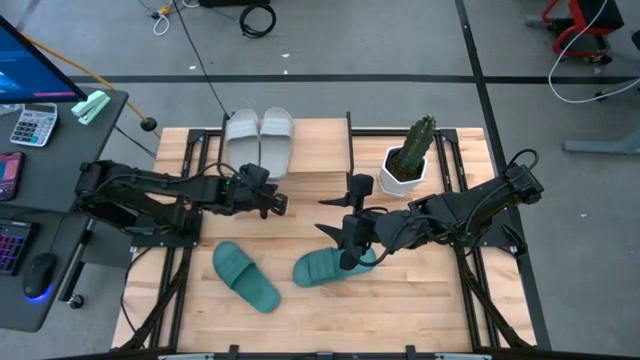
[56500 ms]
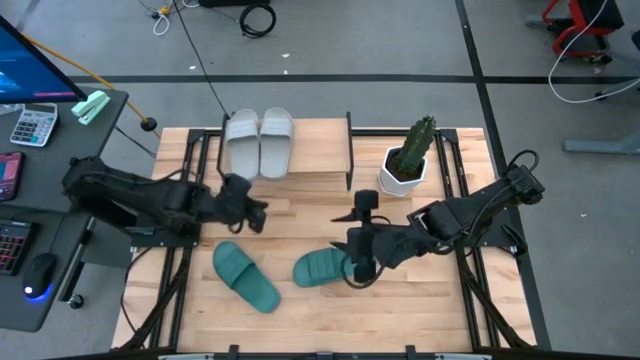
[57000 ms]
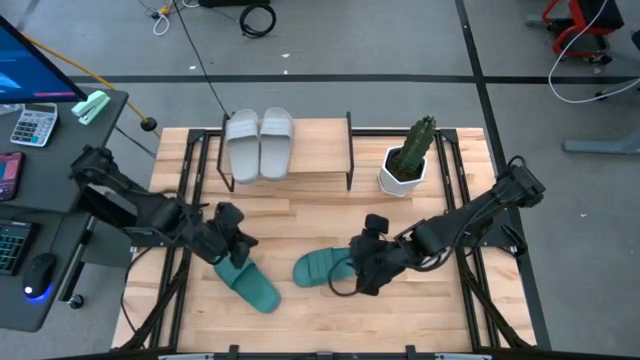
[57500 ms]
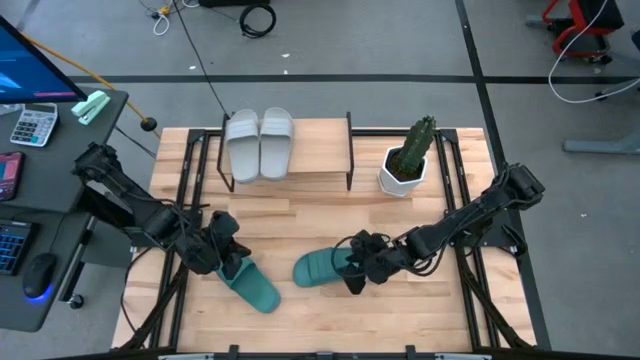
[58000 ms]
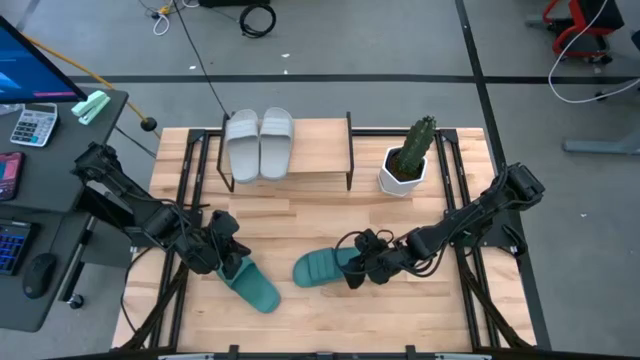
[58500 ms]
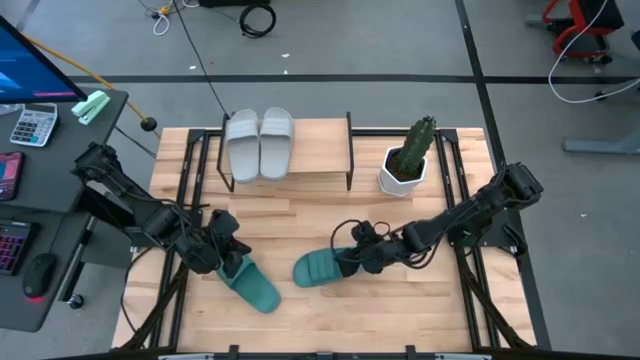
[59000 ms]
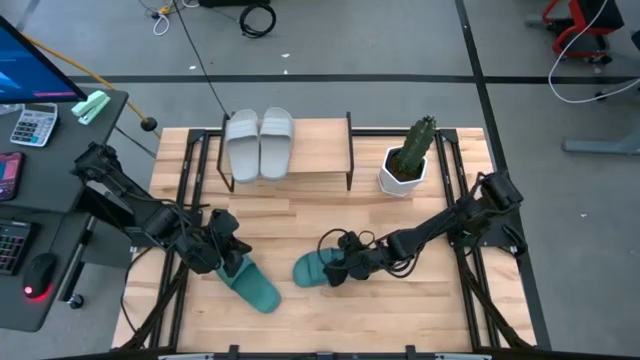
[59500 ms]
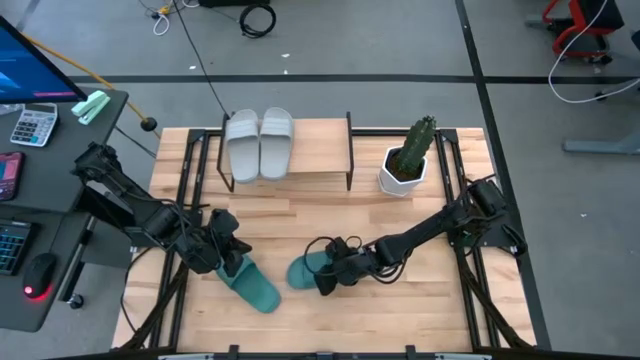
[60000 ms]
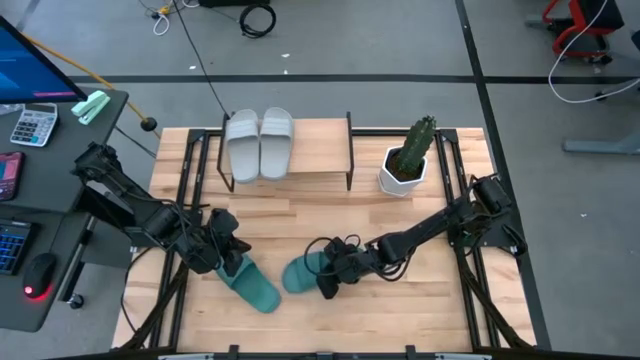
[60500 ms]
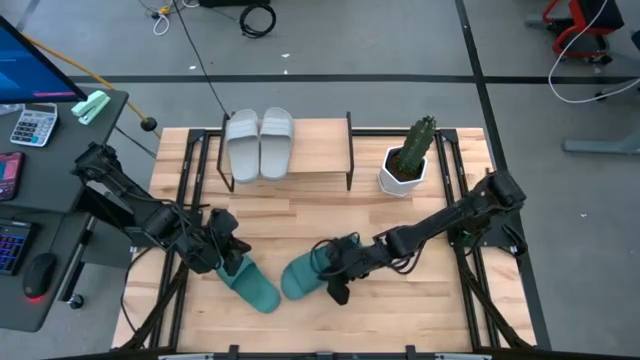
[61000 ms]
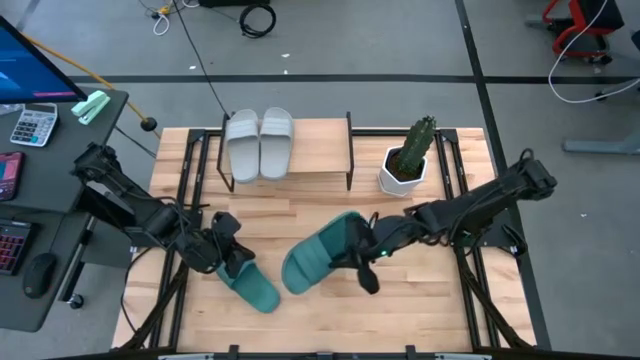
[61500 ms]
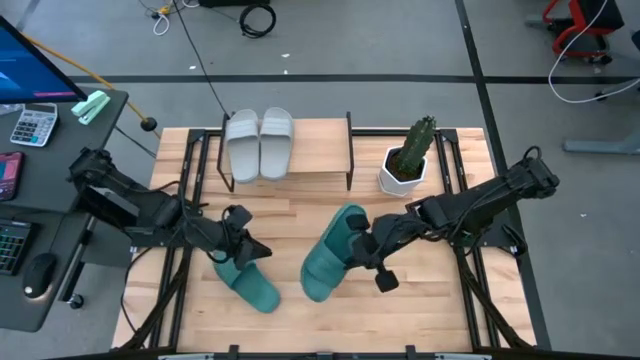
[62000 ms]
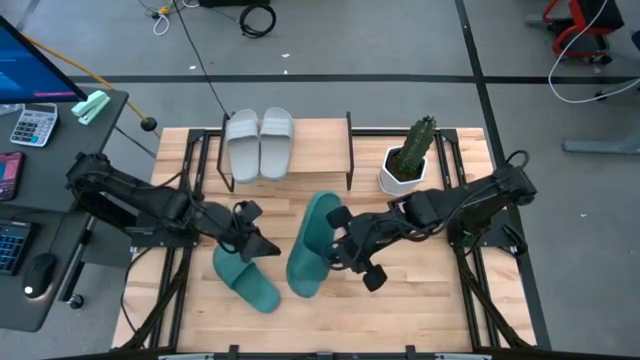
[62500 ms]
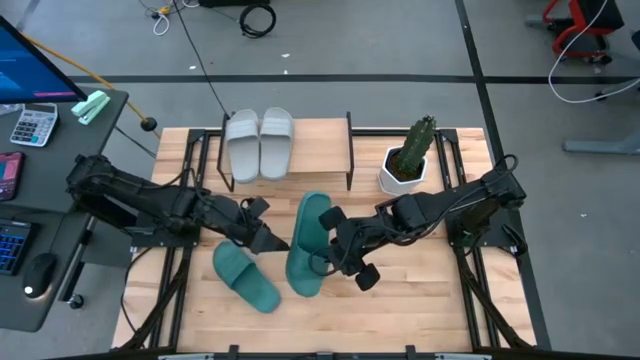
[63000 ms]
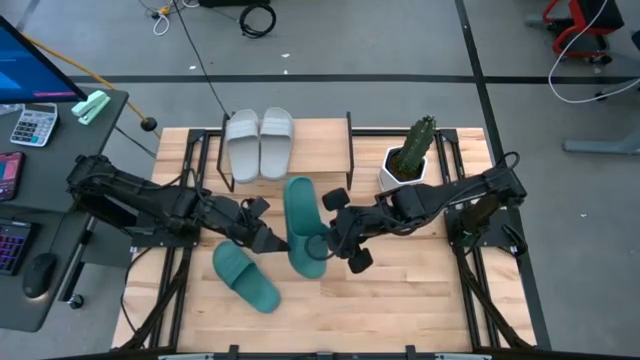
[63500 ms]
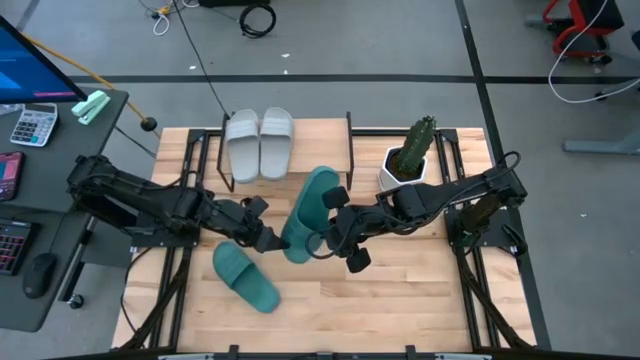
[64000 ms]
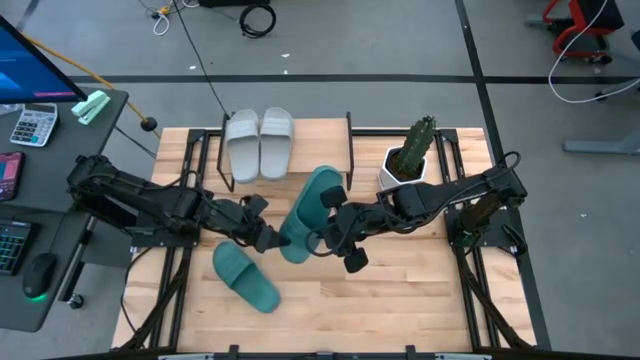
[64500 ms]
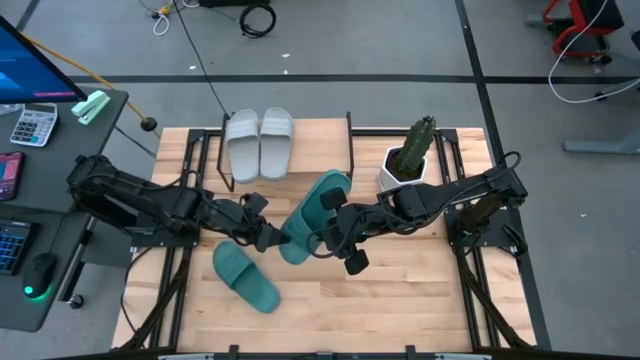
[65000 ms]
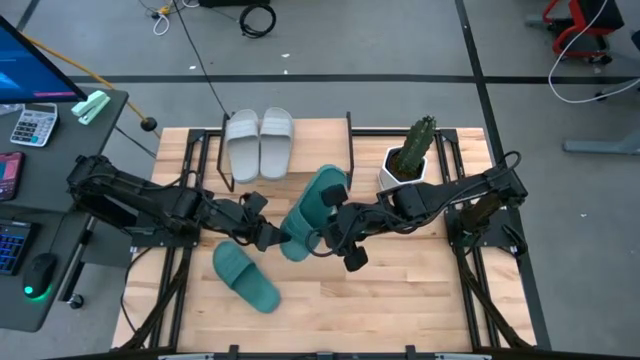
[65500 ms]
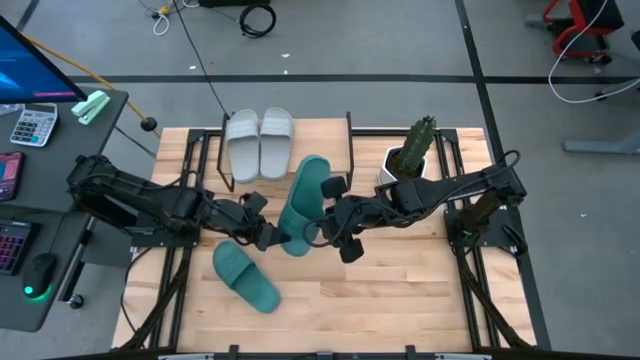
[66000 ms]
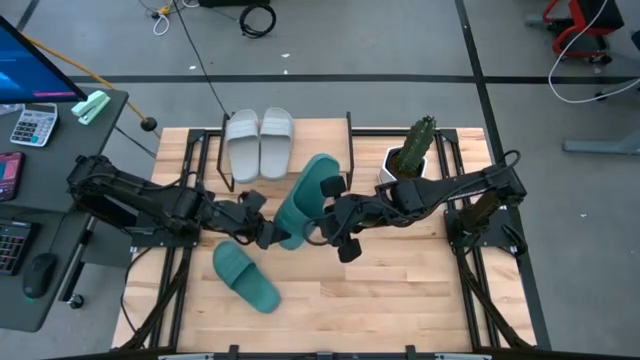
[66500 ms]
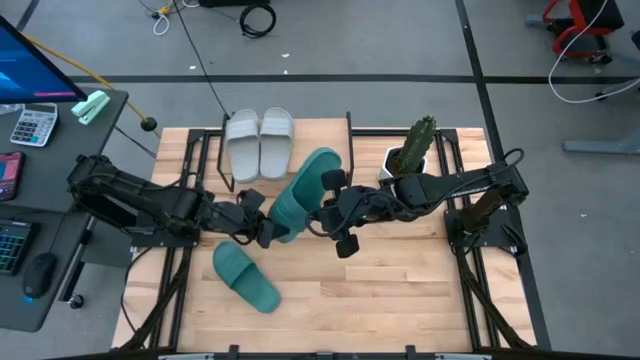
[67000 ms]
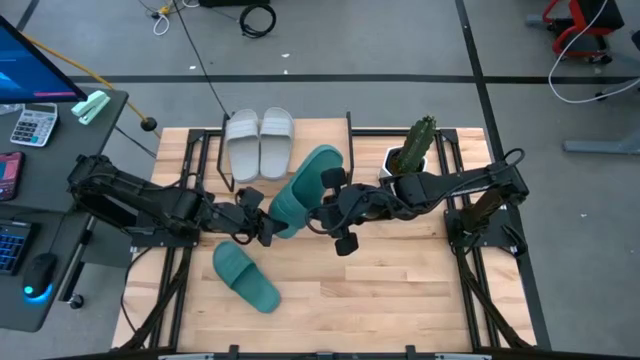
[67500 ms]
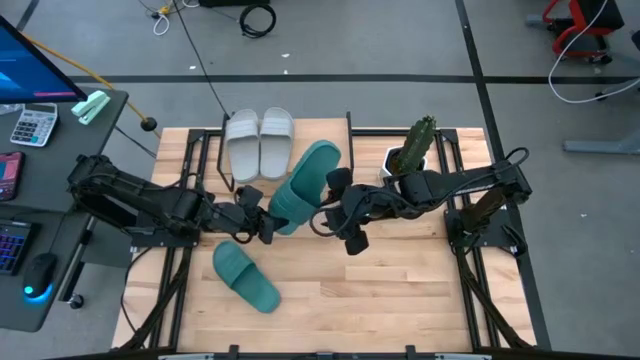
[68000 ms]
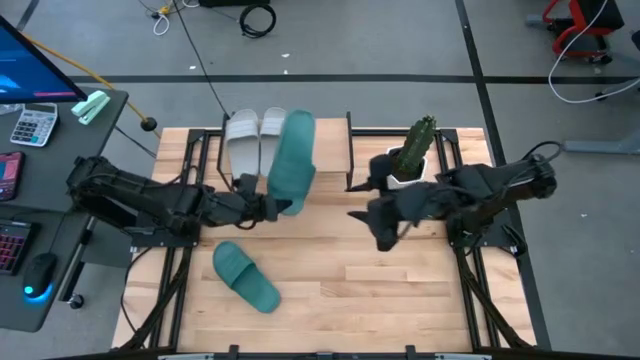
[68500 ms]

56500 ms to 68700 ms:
Task: Pick and place slides into the shelf
Put the right green slipper on the shelf

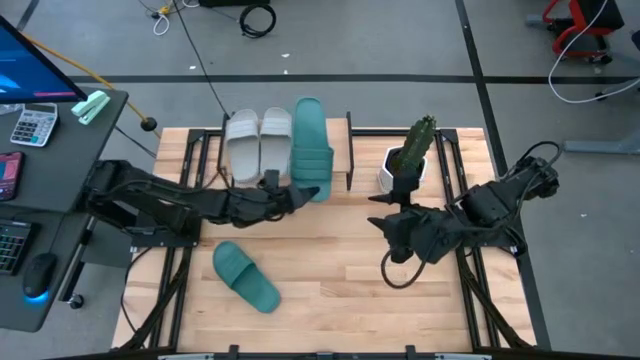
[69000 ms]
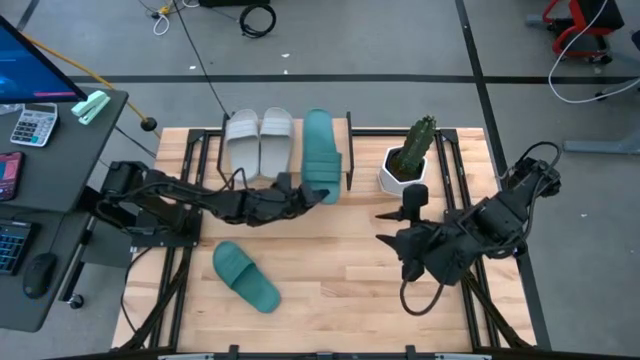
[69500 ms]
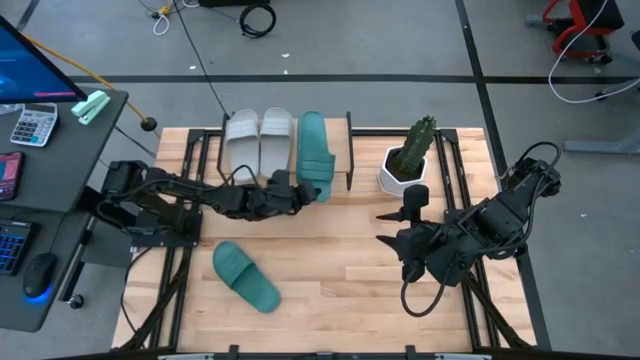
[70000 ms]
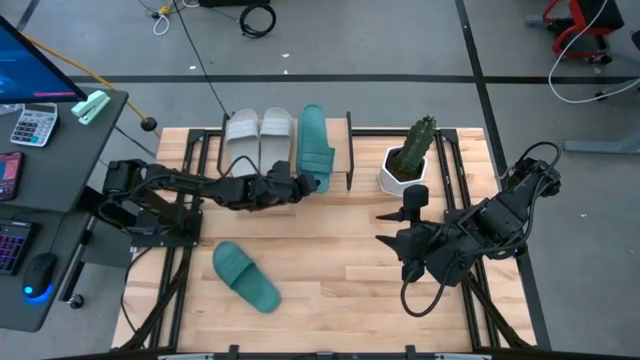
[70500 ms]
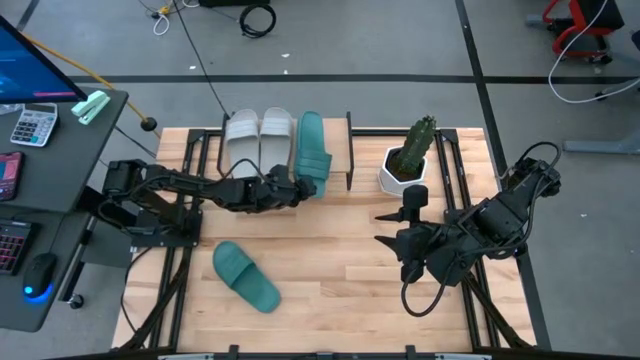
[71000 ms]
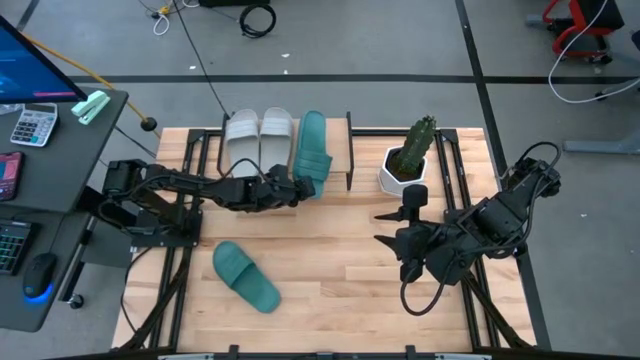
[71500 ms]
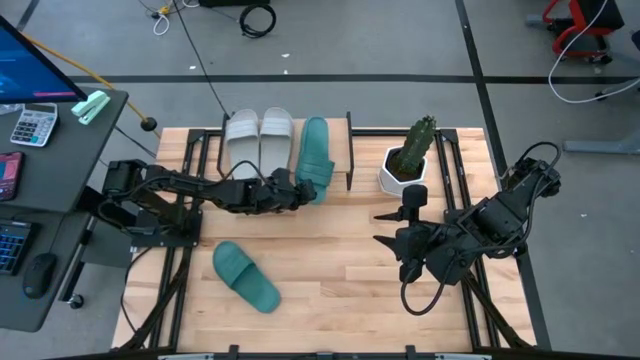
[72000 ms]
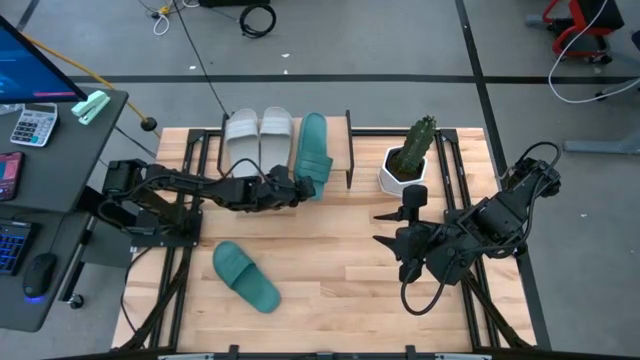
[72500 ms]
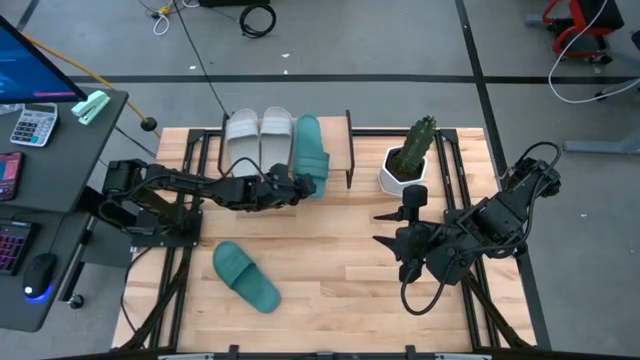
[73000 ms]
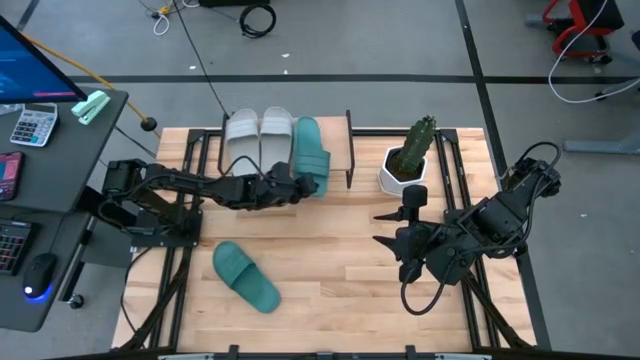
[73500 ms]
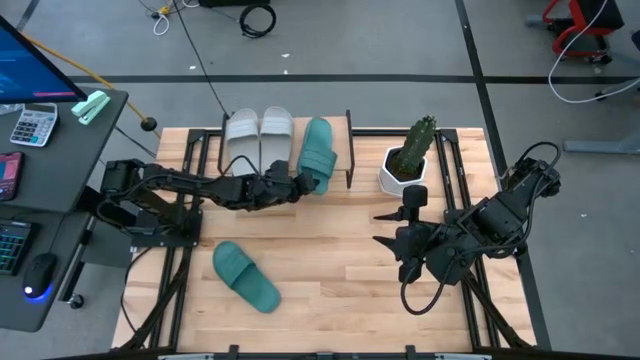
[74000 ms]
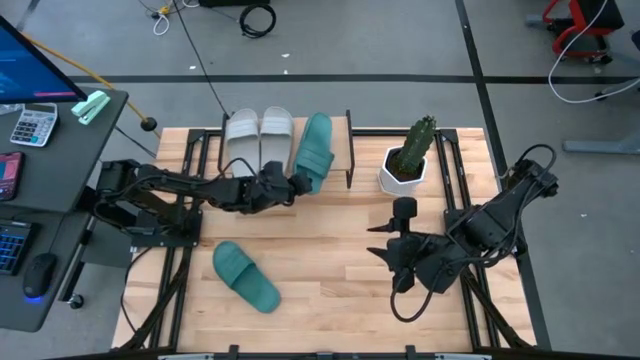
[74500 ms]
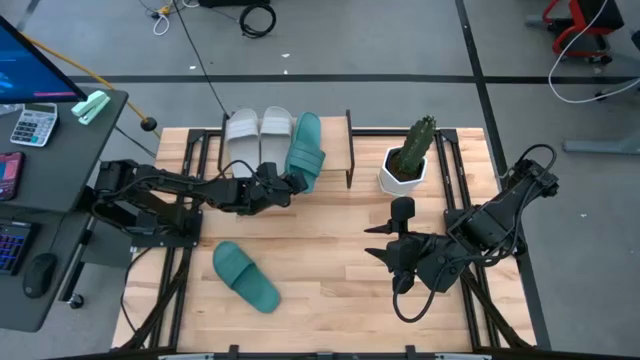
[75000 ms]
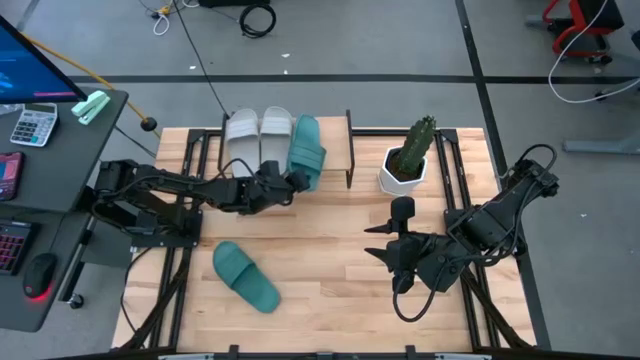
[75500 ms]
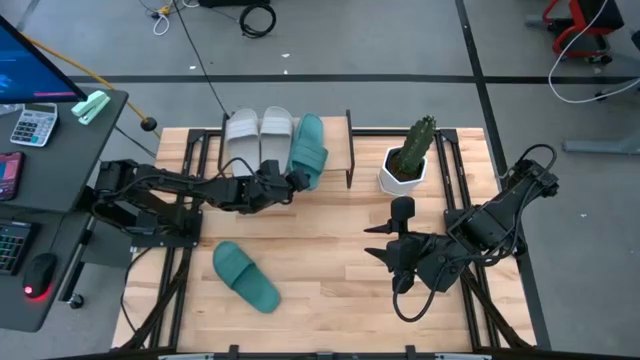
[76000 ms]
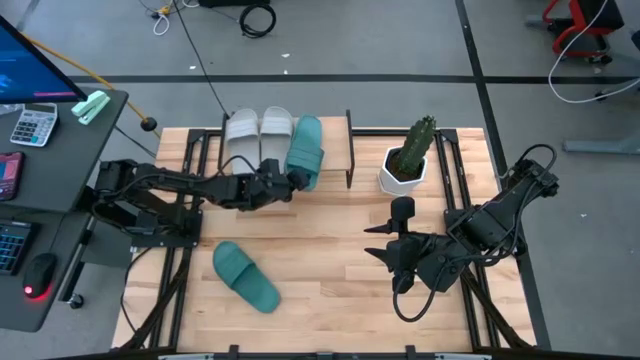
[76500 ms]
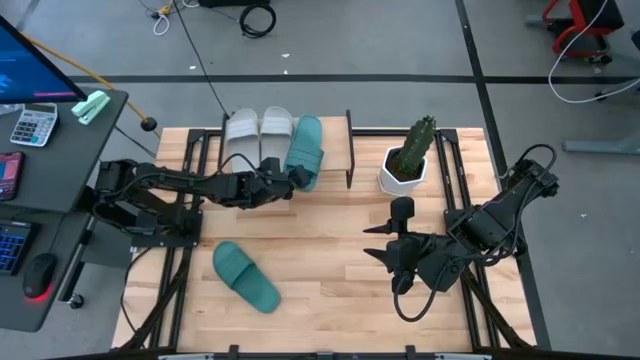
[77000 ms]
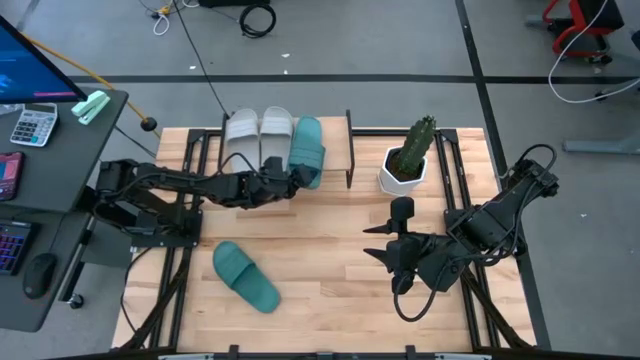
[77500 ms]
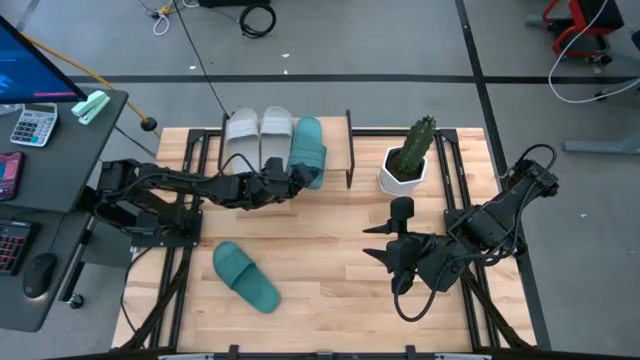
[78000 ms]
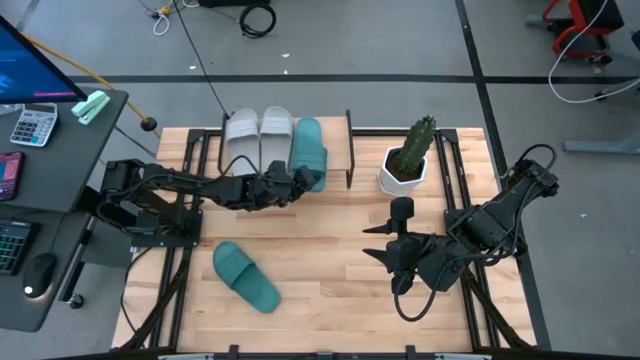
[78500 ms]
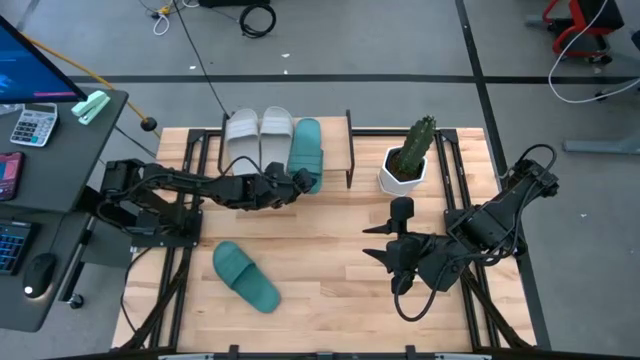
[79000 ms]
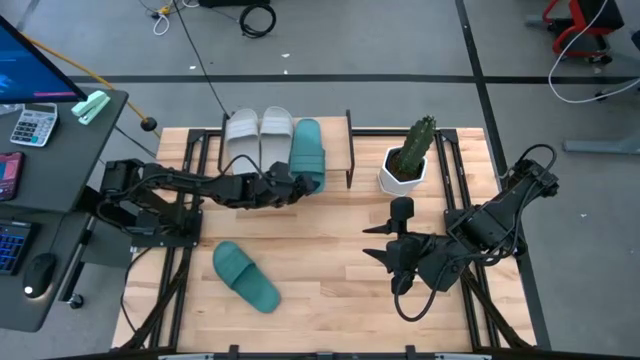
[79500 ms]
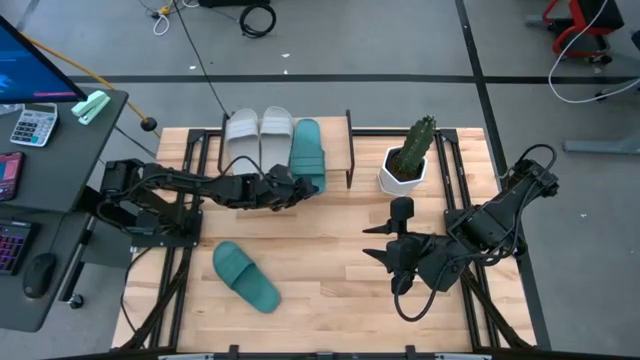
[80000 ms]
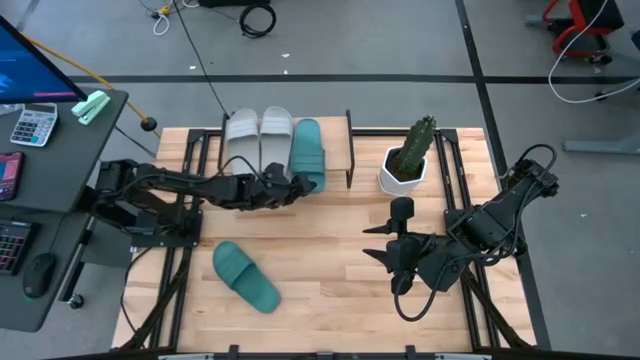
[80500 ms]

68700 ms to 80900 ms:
Put the right green slipper on the shelf
